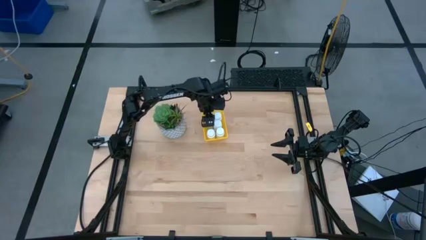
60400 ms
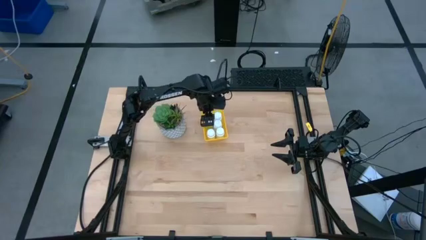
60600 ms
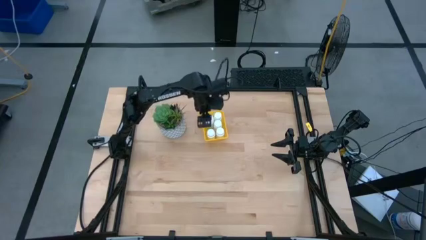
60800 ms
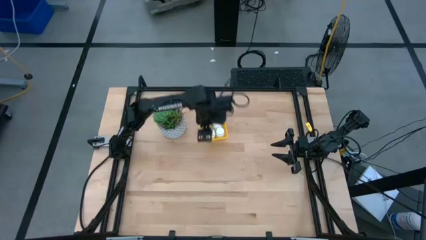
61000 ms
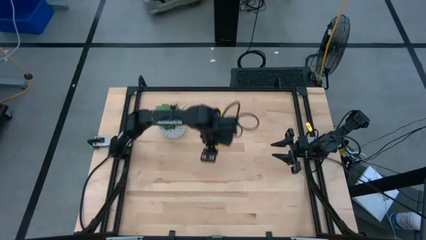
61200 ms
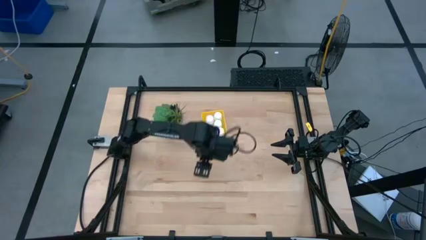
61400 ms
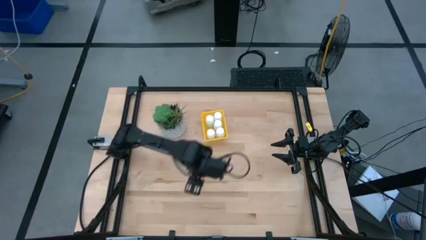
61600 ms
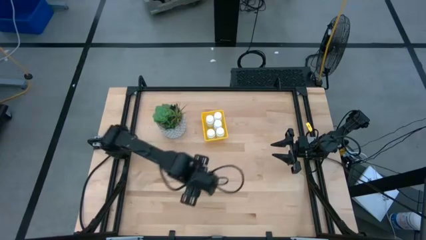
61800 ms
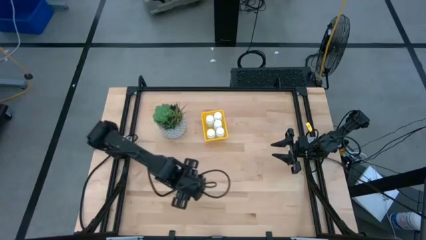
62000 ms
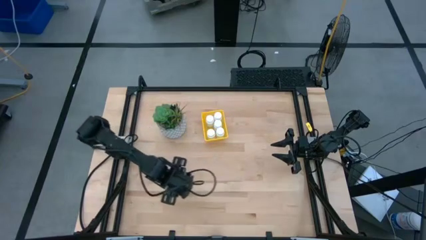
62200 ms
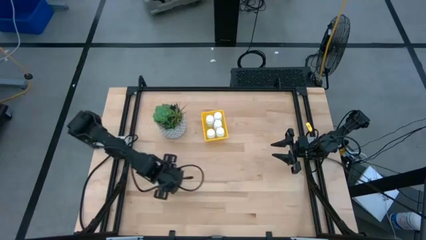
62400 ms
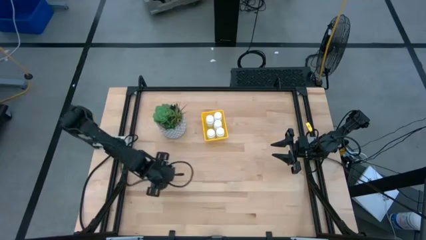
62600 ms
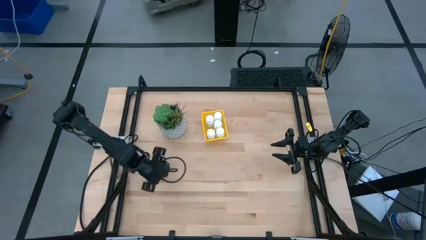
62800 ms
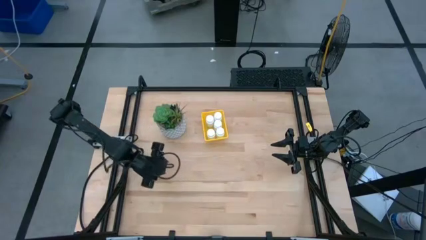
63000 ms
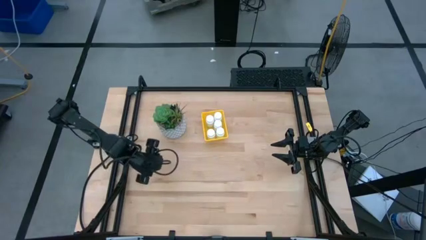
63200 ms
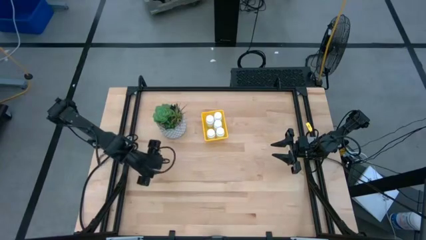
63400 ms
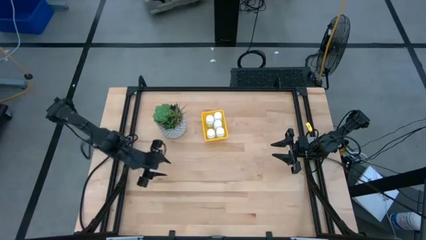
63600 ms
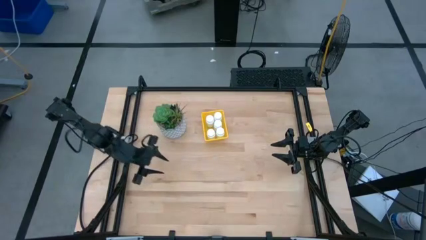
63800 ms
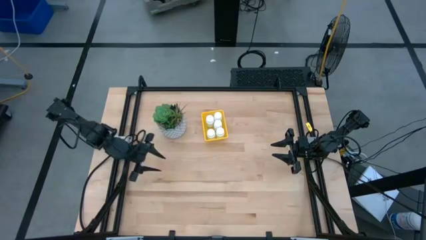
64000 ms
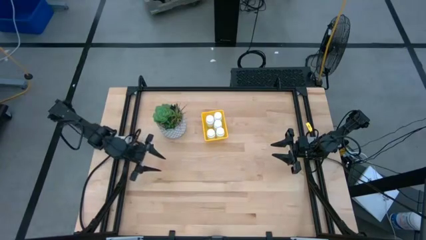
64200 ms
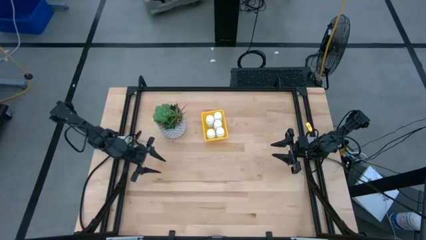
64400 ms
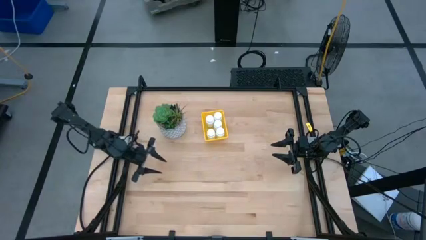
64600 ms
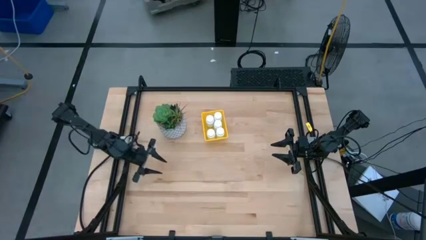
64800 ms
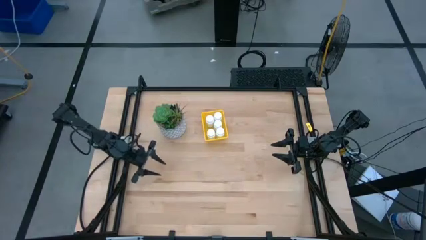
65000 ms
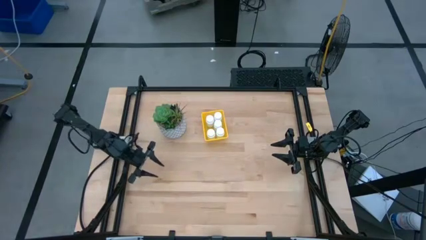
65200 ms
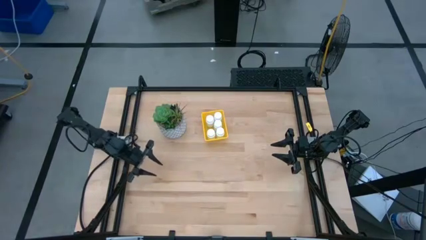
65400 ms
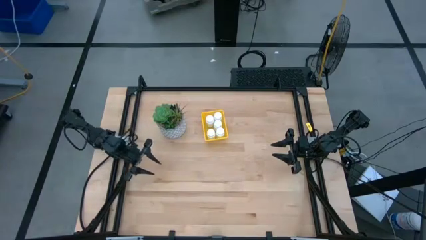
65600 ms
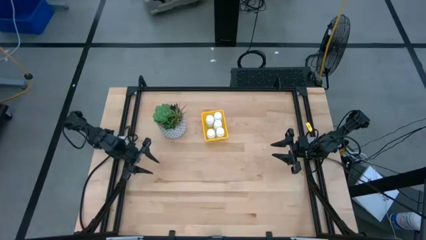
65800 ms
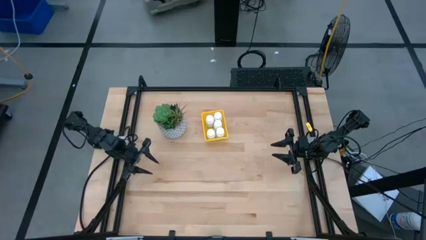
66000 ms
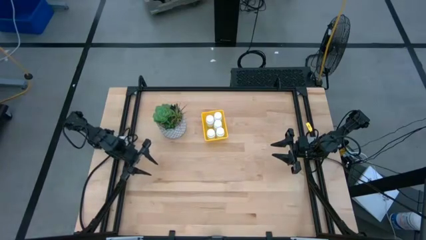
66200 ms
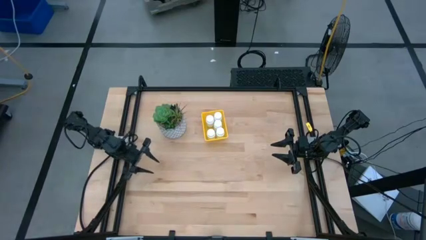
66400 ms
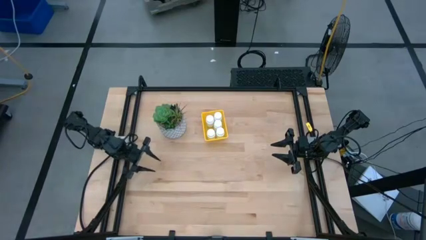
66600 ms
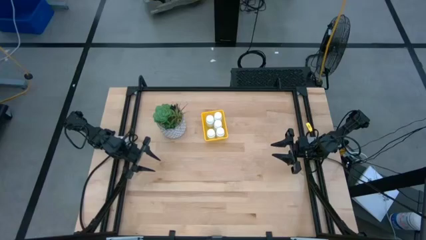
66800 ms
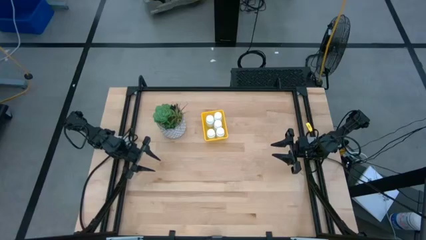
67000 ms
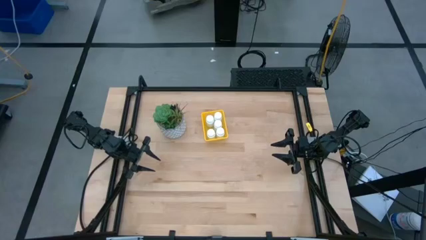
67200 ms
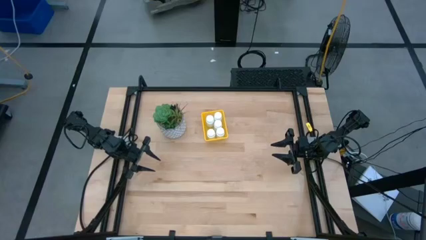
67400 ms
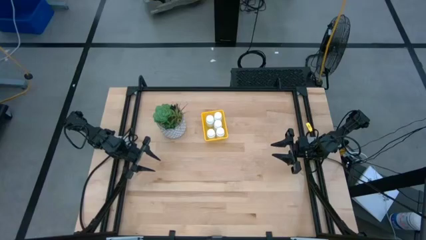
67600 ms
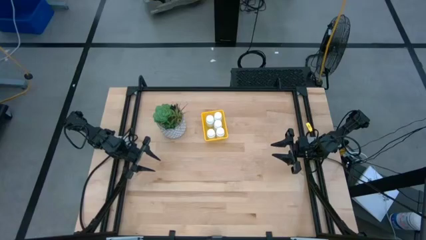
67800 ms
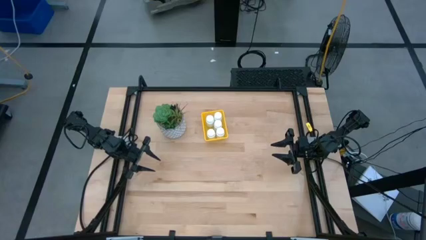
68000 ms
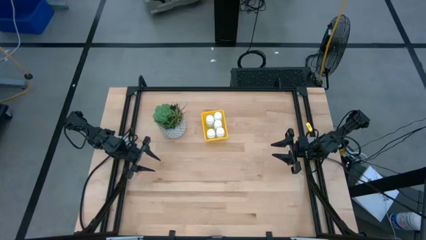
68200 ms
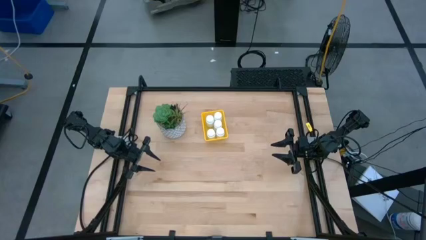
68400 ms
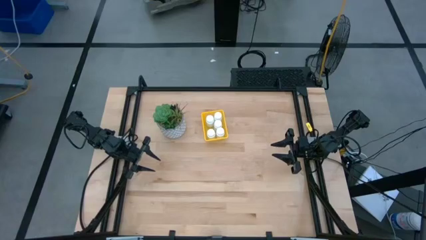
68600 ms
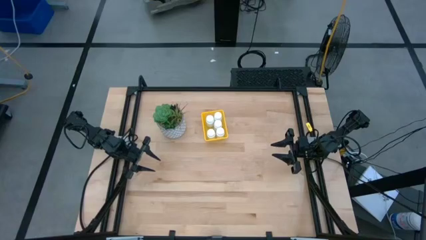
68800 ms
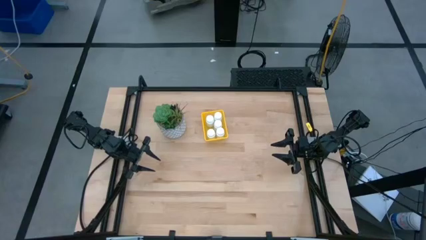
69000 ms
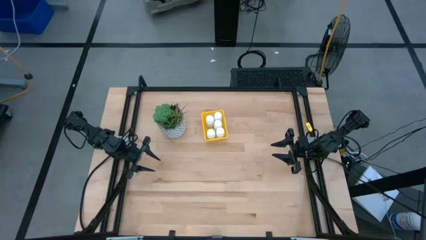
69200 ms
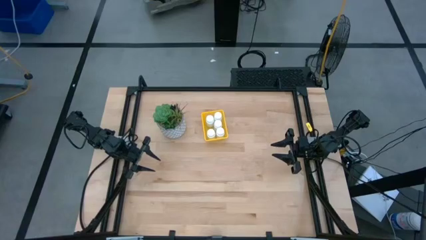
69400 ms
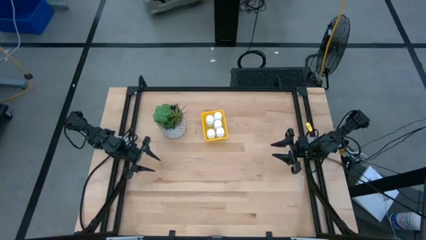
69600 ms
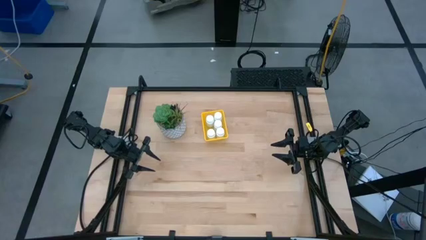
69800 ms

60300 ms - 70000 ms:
Task: Pick and place pill bottles into a basket
Return to Home Position
